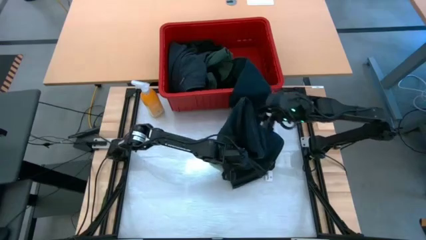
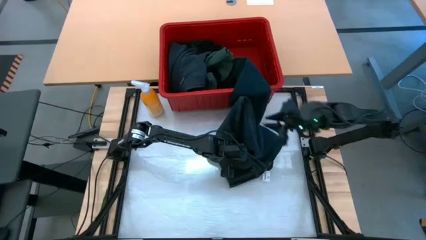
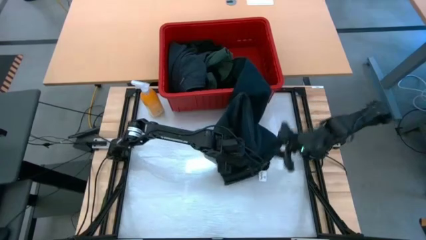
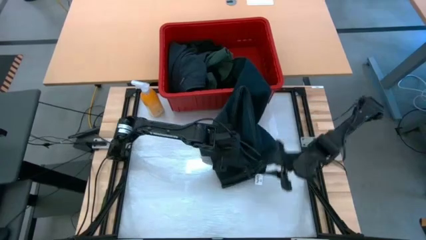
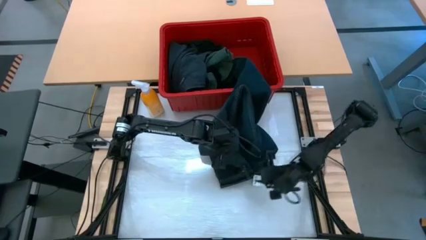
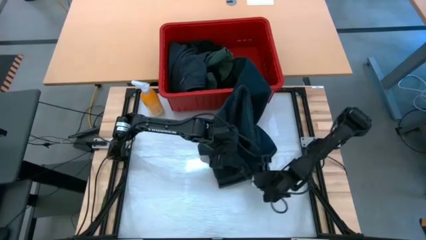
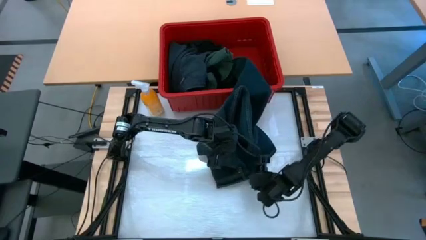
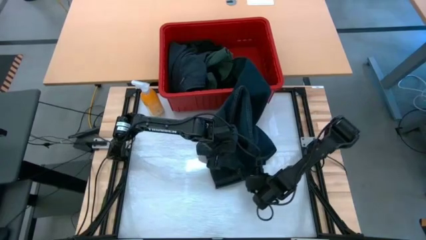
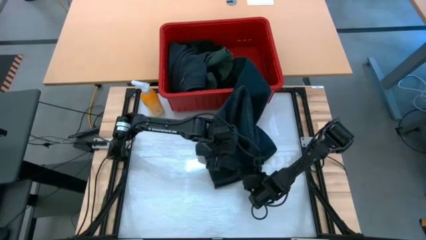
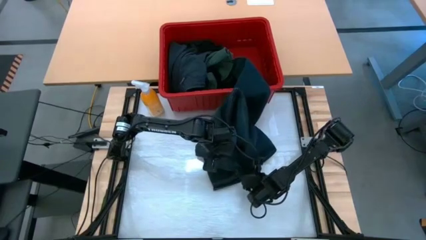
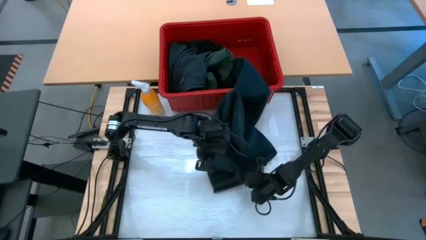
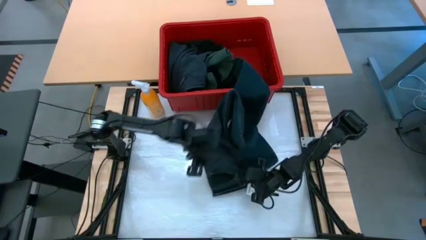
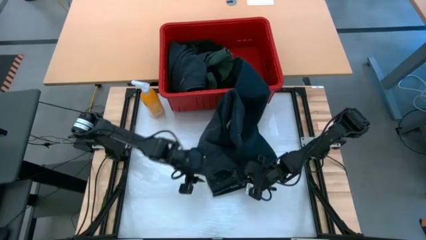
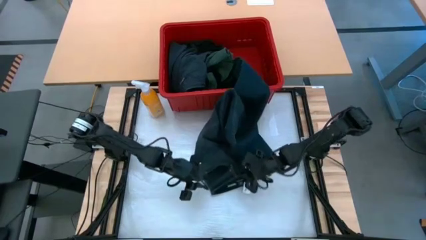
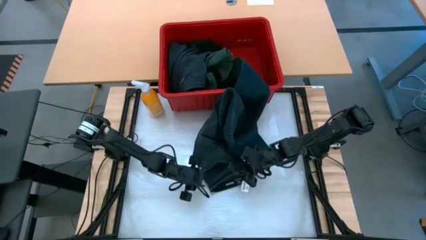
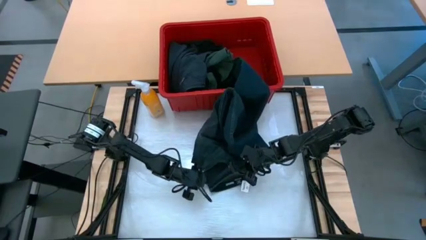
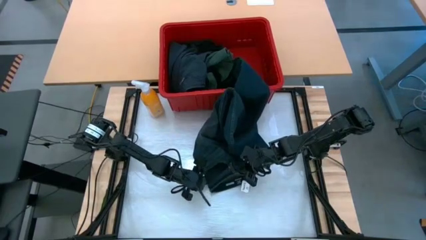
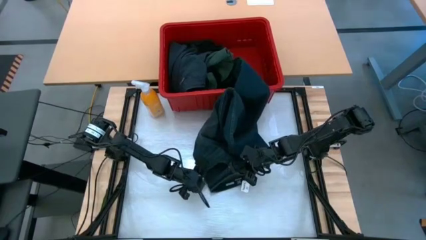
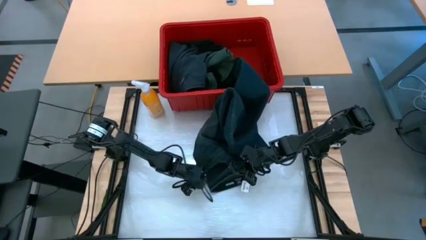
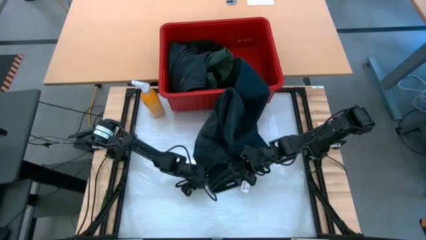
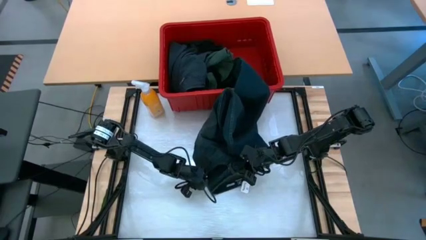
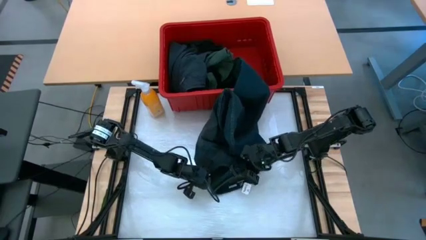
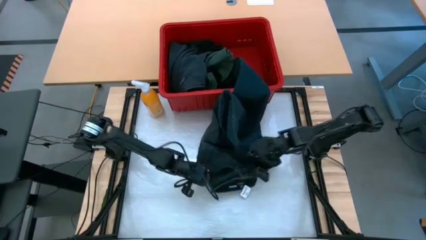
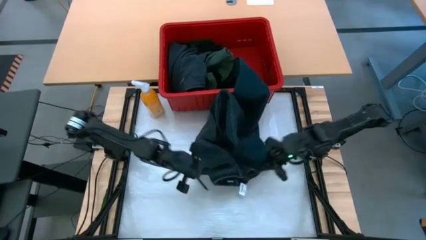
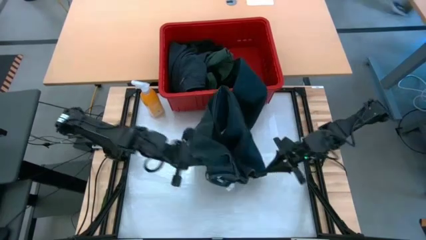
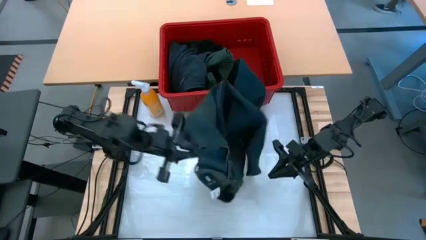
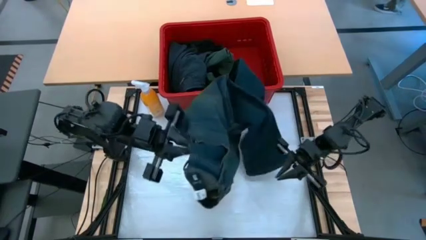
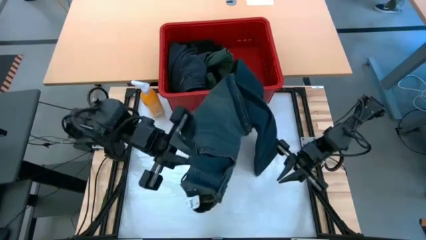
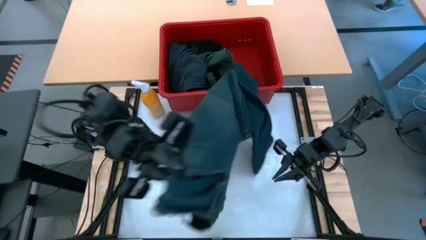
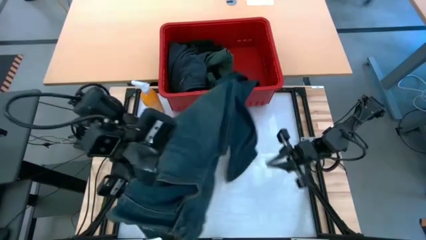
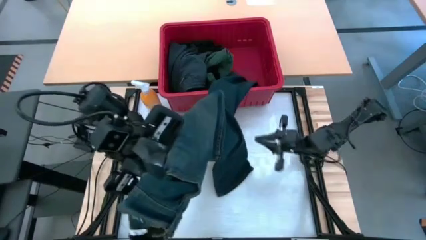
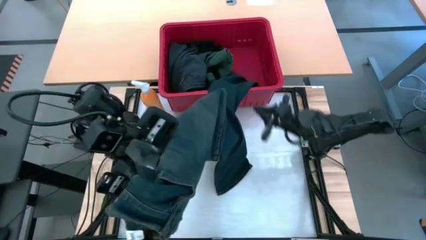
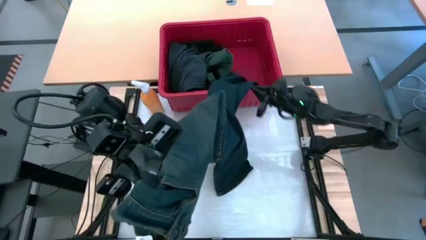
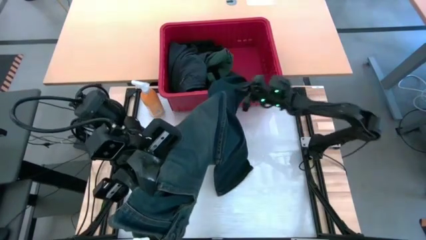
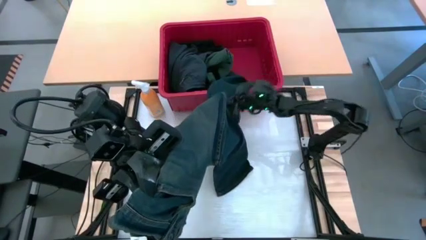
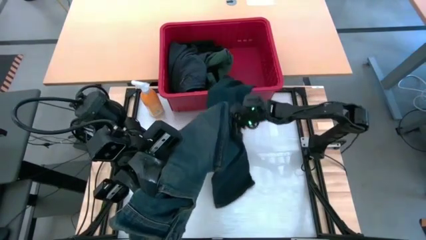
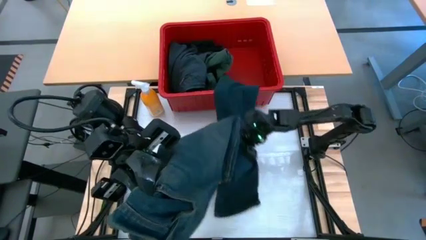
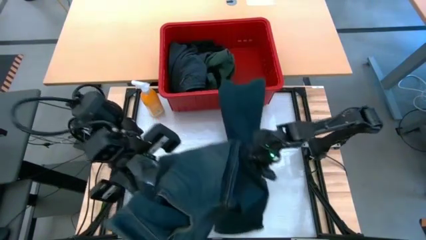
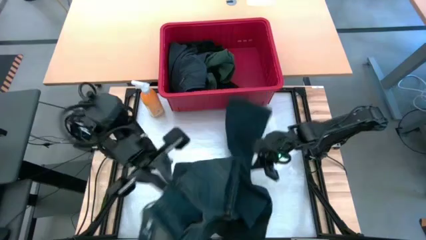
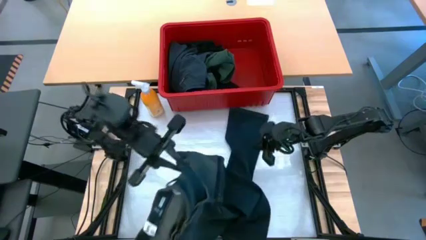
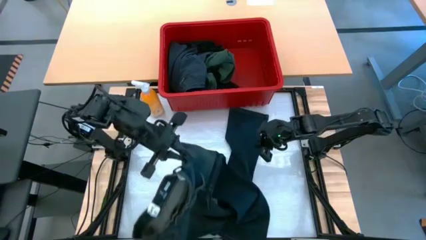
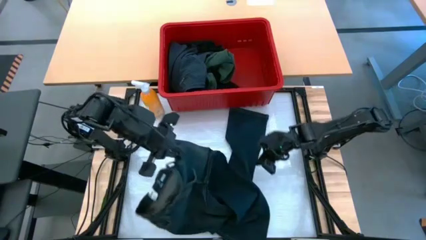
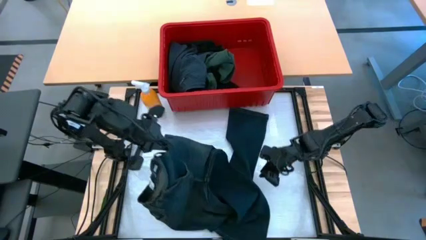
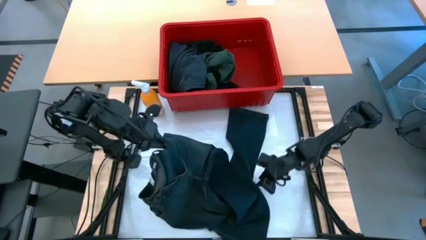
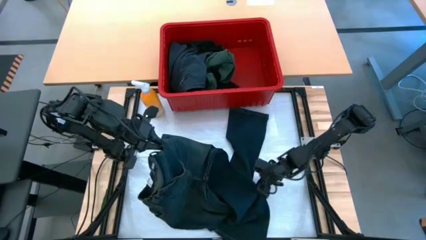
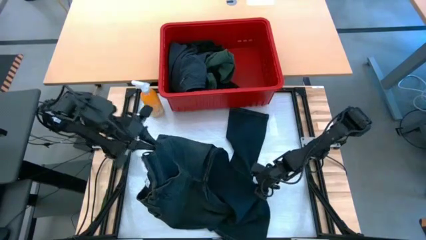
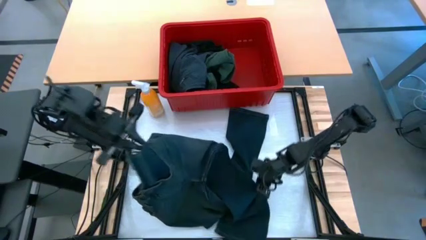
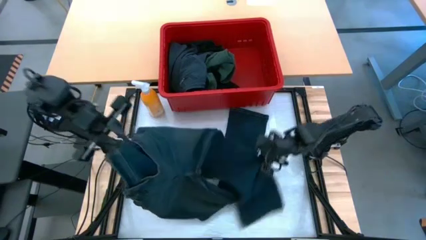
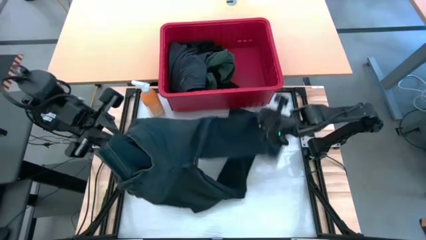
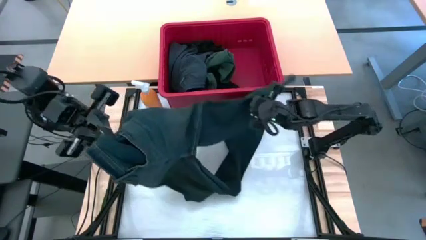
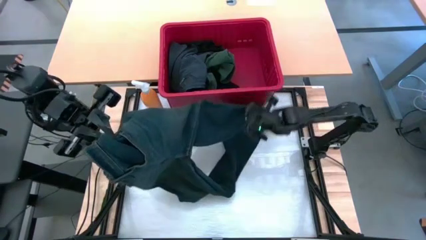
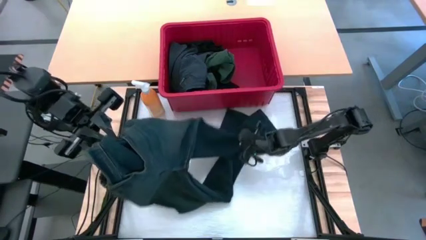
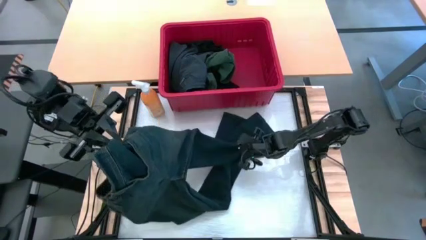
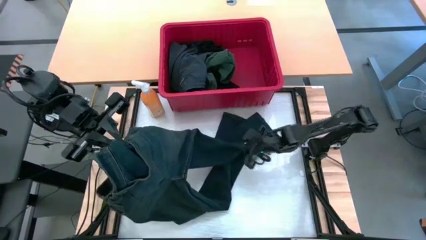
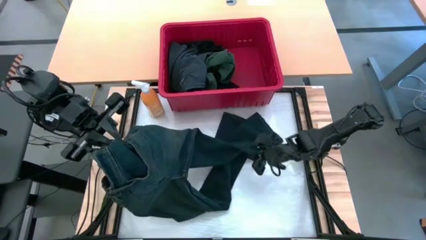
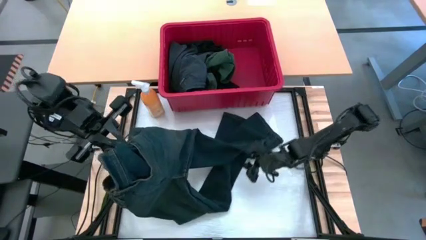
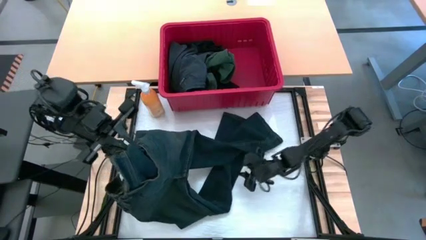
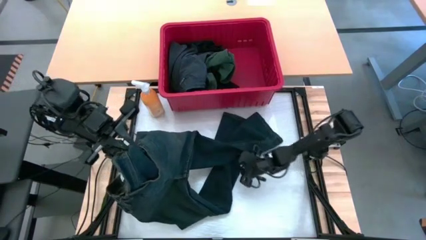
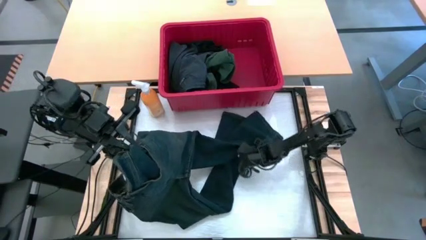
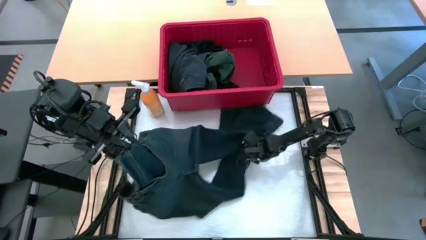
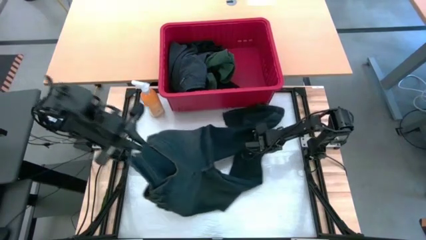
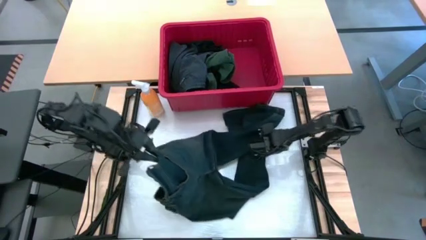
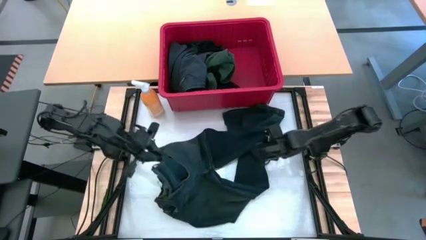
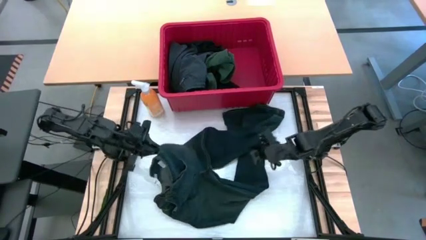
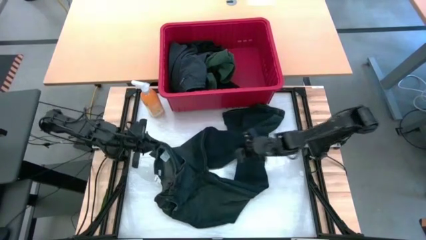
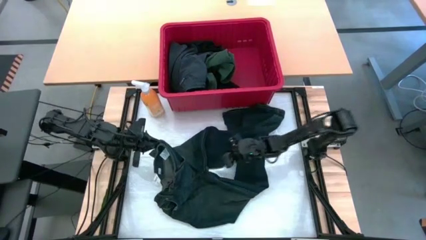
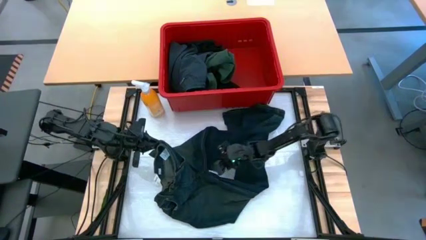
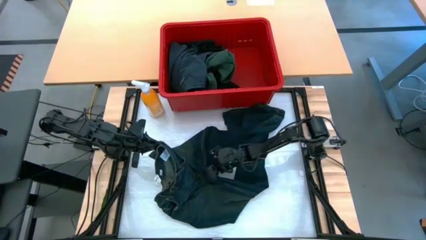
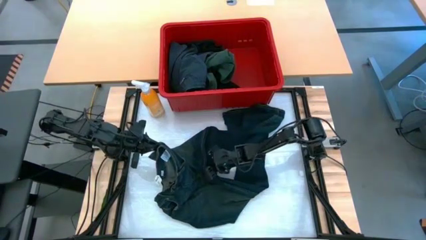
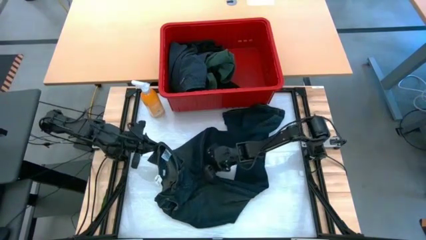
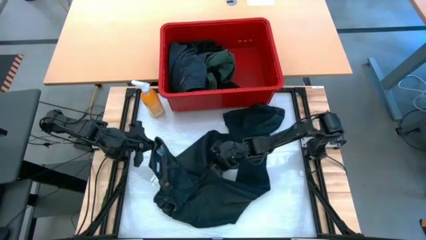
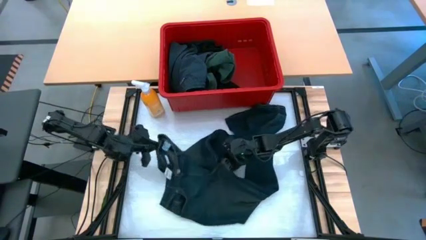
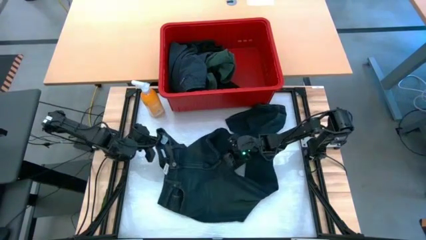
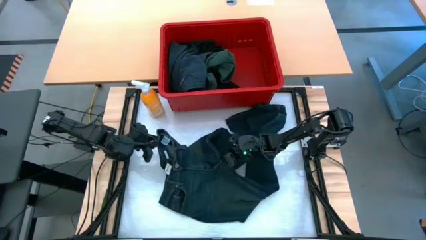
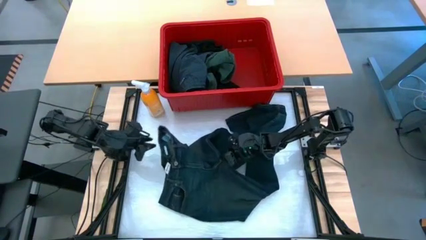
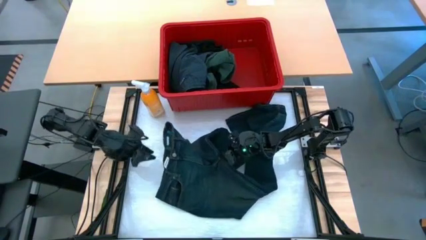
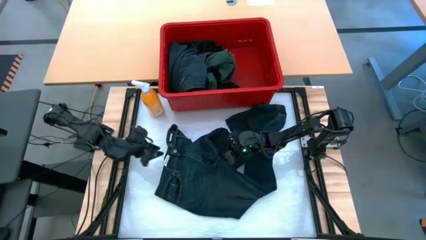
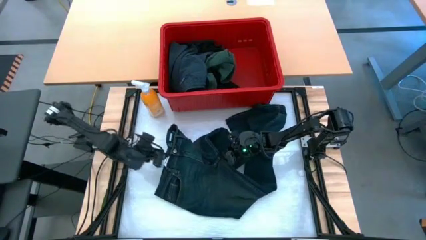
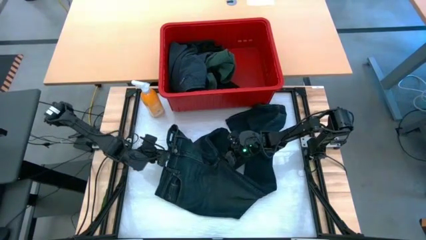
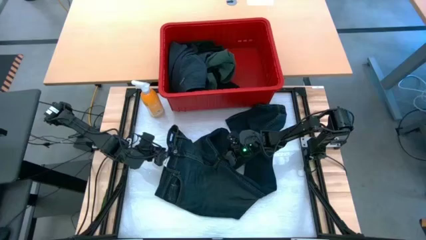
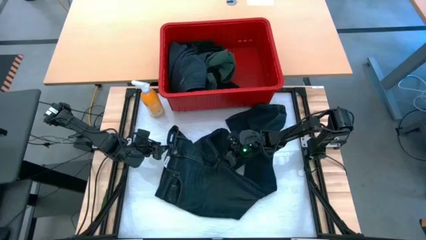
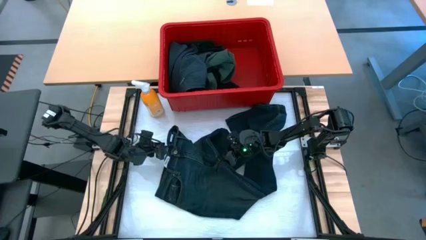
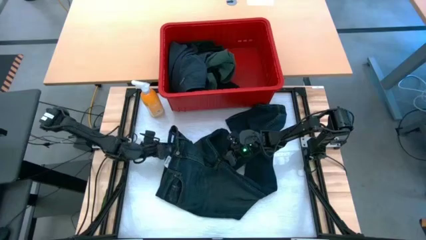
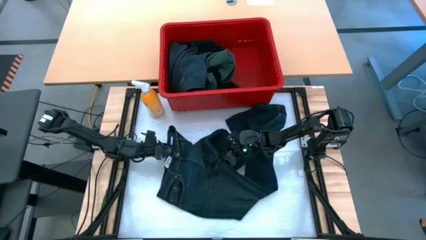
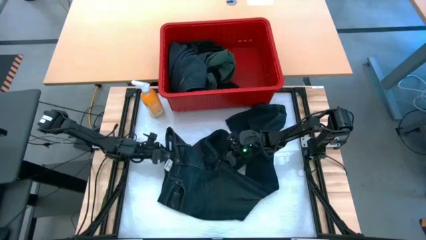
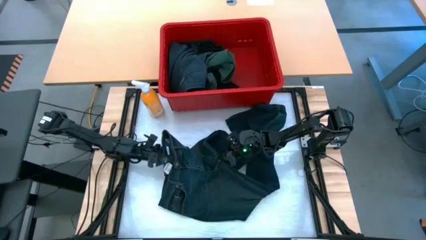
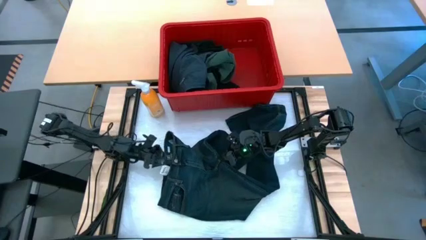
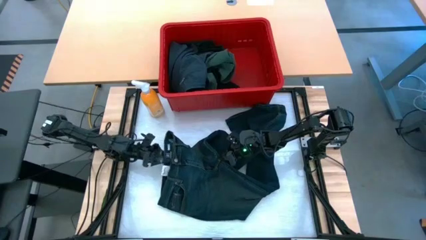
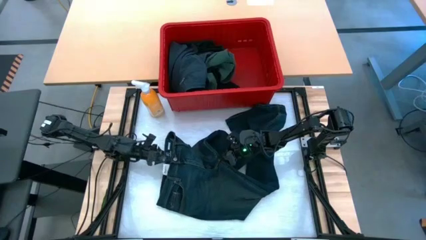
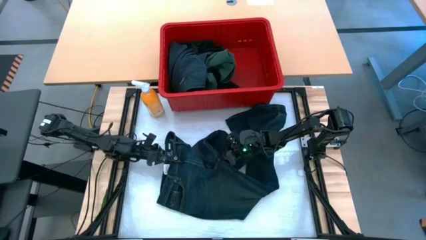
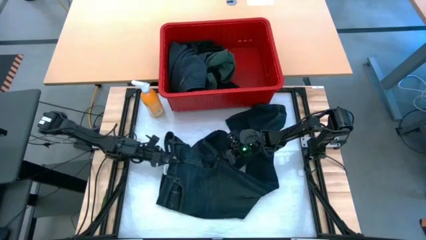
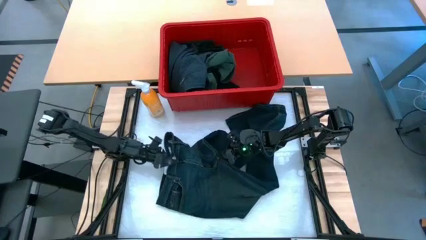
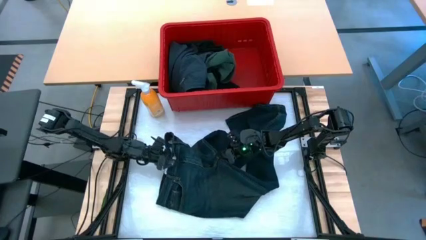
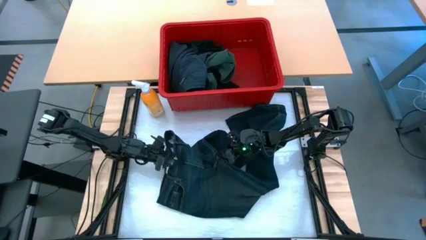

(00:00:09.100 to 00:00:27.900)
Task: Fold Laundry from Bin
Fold the blue pants
